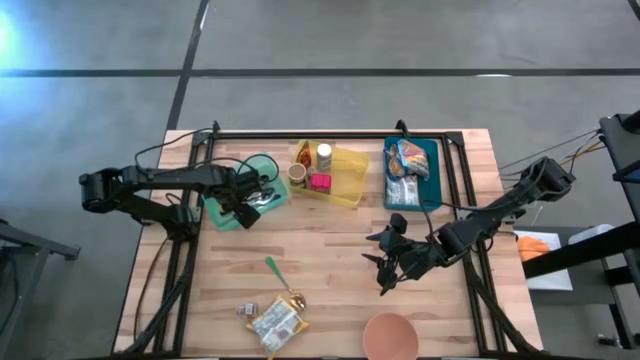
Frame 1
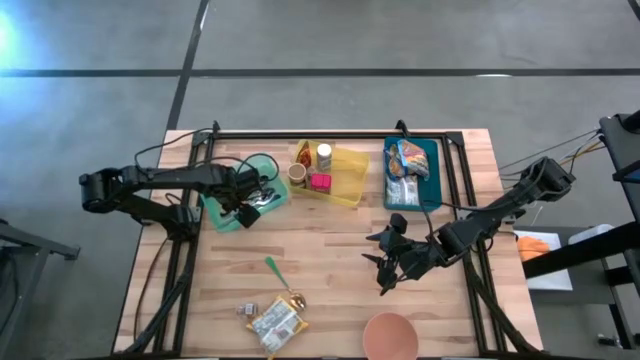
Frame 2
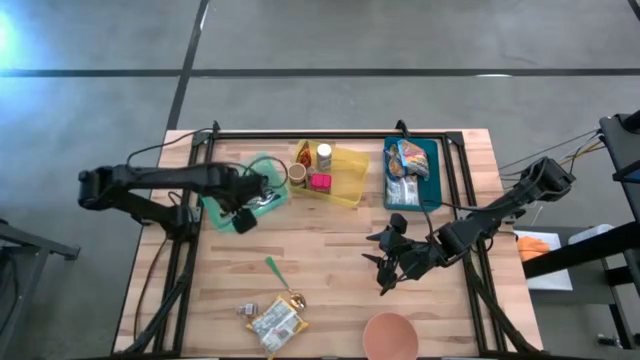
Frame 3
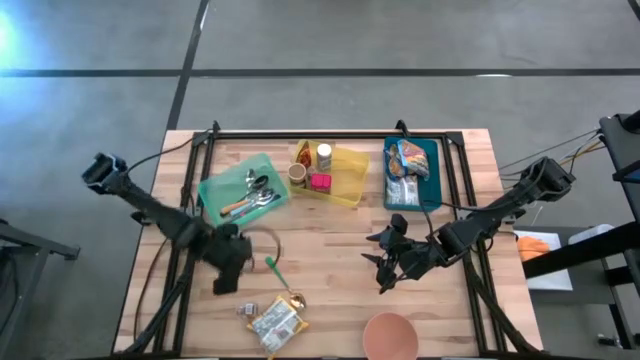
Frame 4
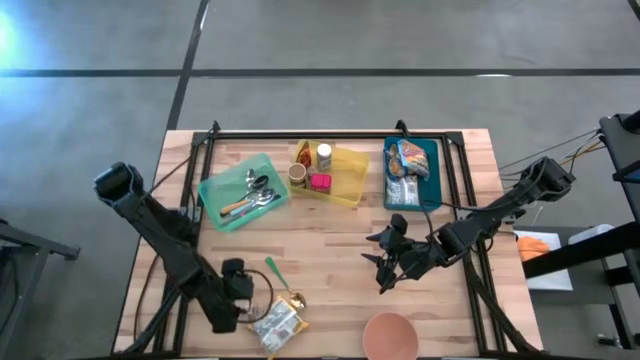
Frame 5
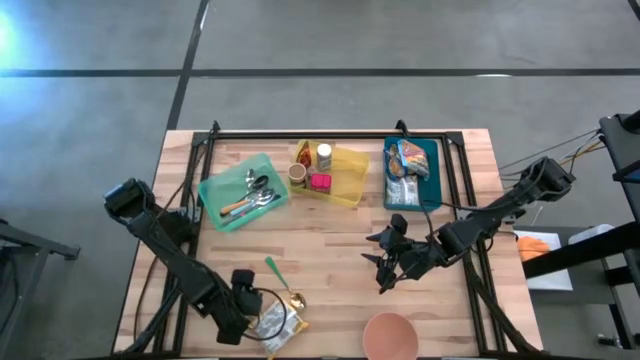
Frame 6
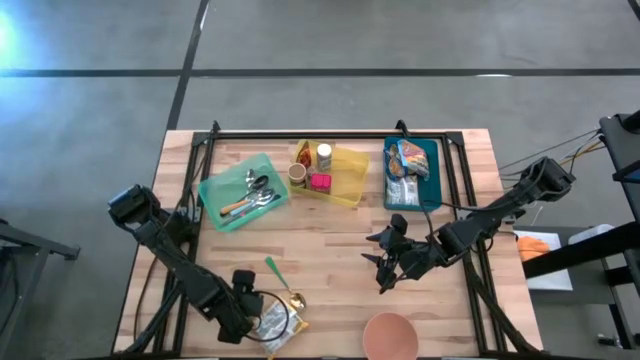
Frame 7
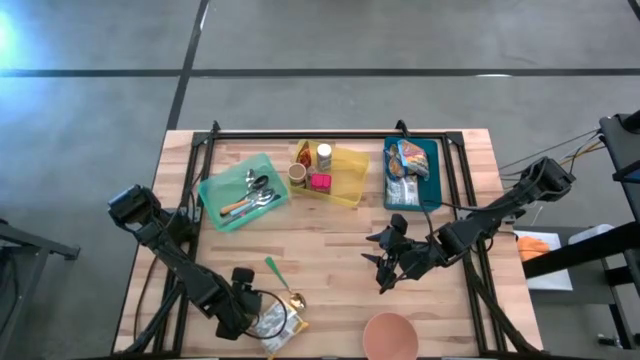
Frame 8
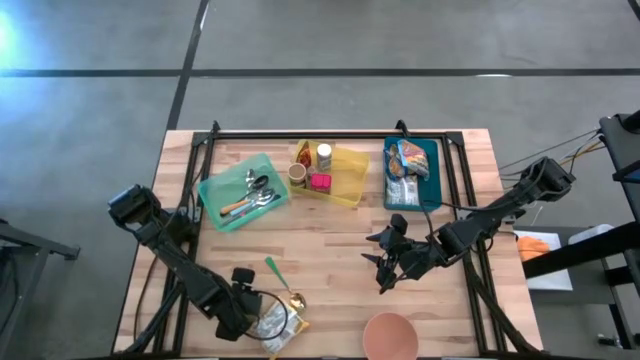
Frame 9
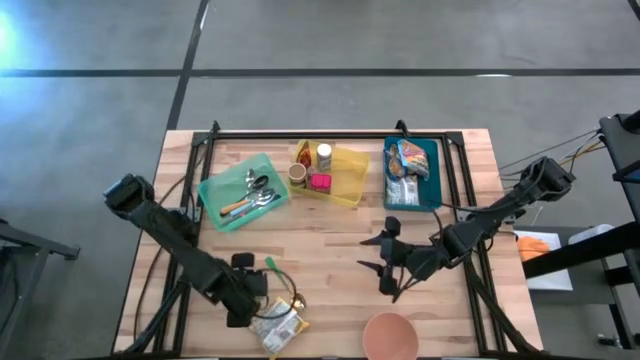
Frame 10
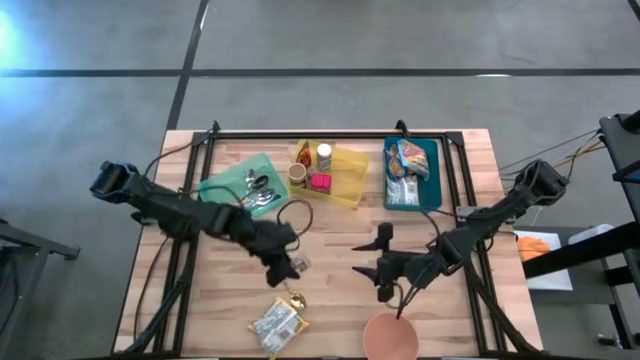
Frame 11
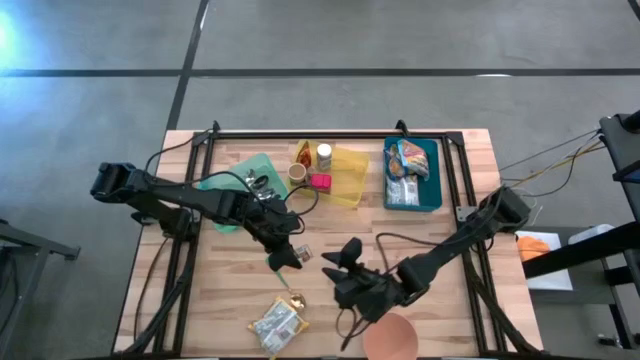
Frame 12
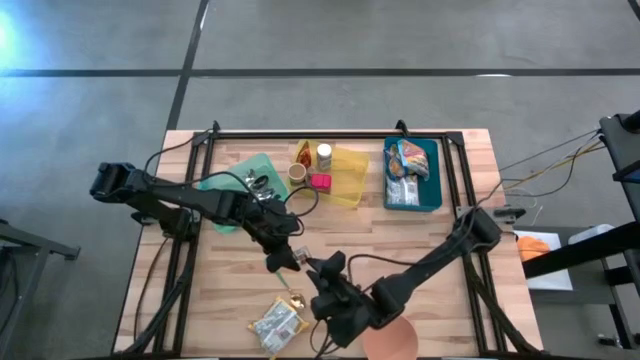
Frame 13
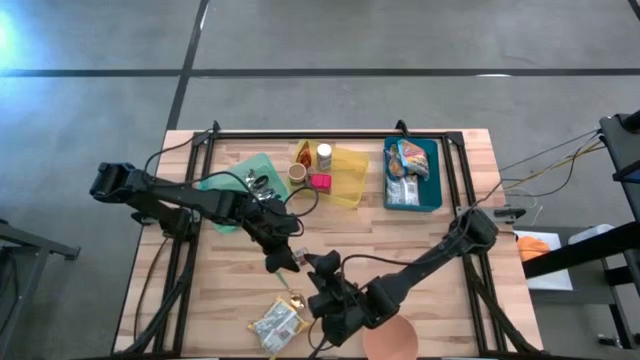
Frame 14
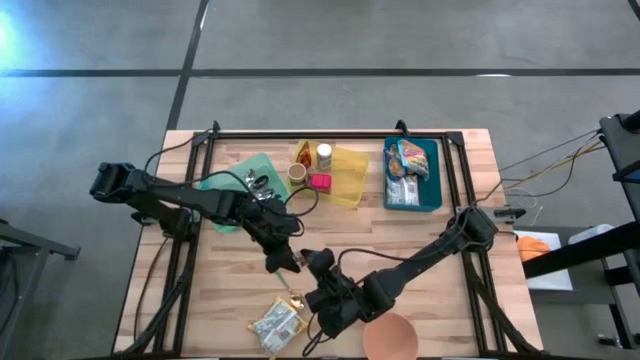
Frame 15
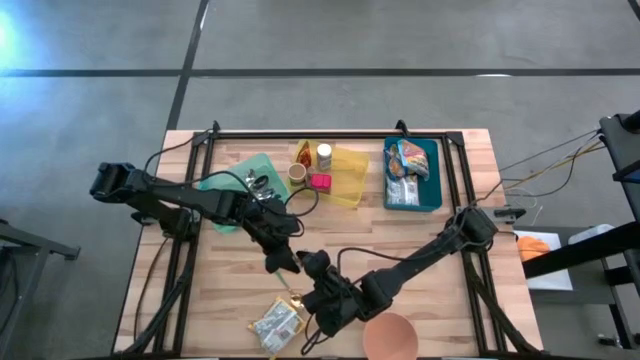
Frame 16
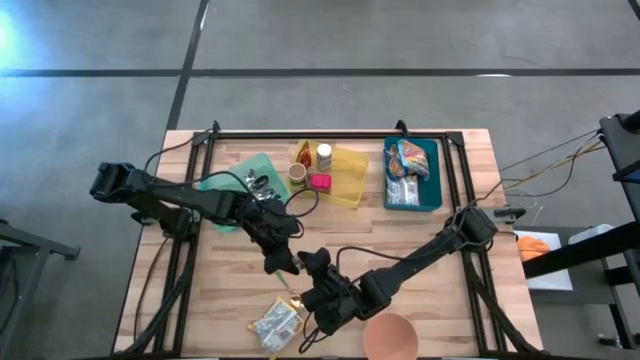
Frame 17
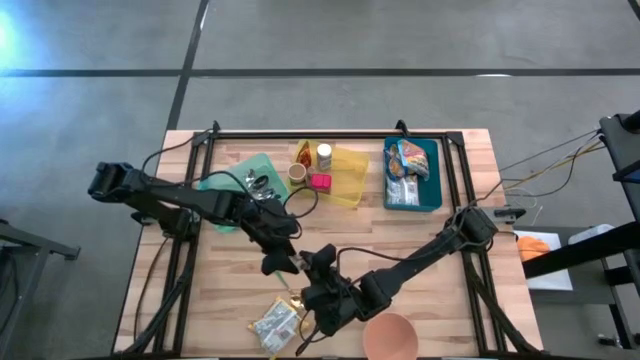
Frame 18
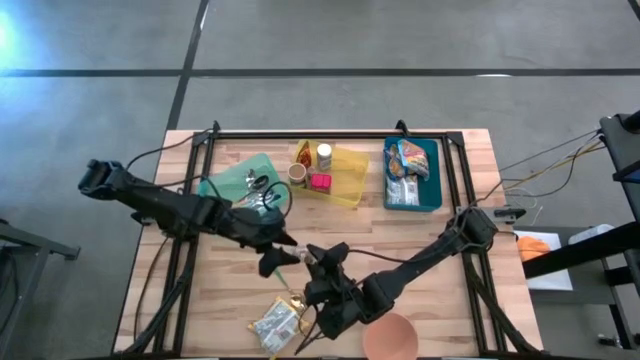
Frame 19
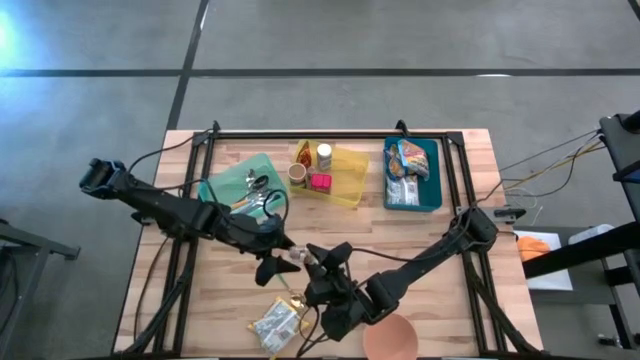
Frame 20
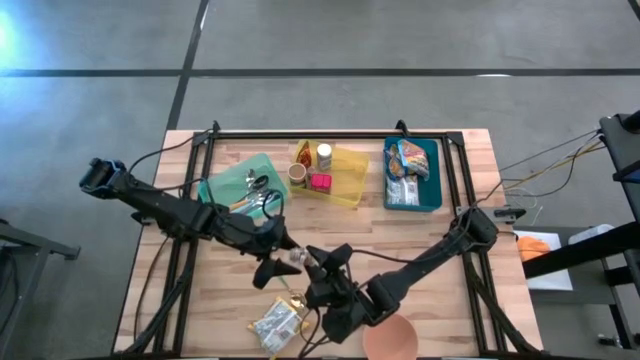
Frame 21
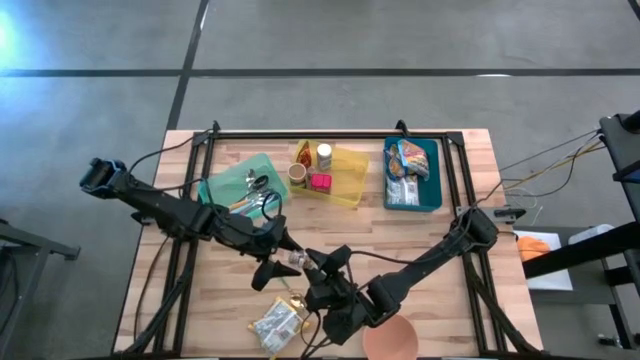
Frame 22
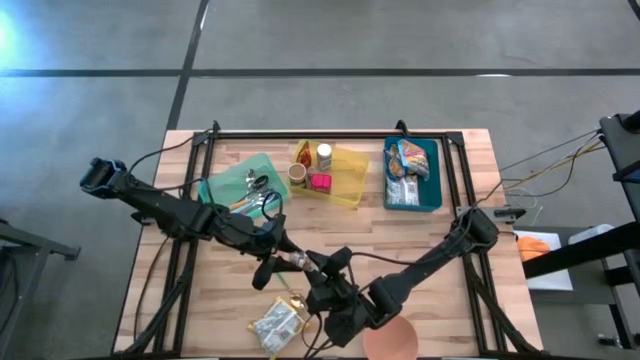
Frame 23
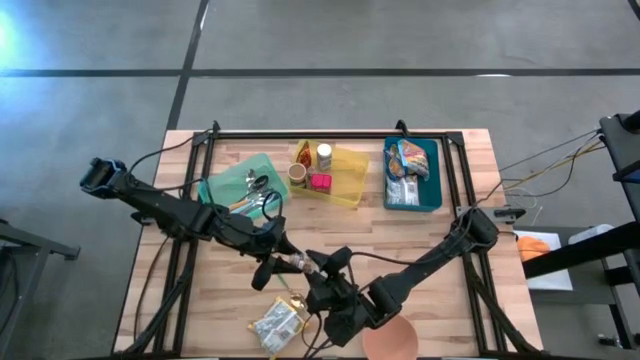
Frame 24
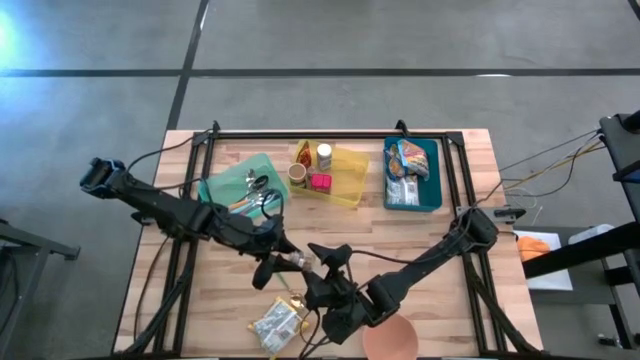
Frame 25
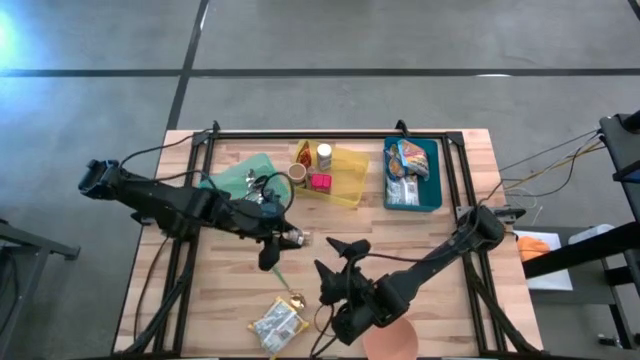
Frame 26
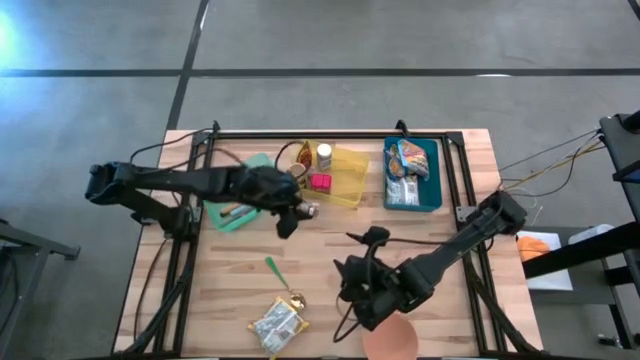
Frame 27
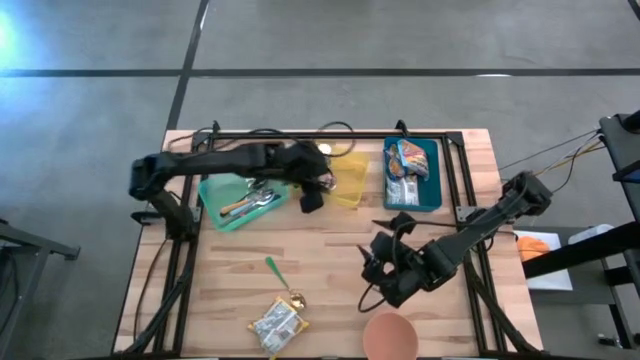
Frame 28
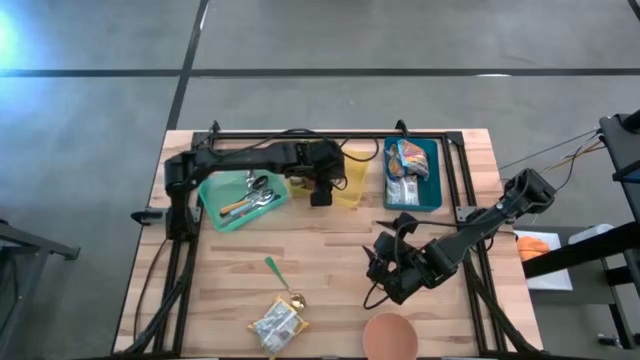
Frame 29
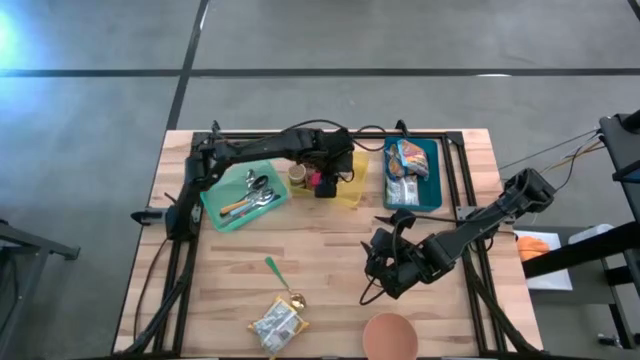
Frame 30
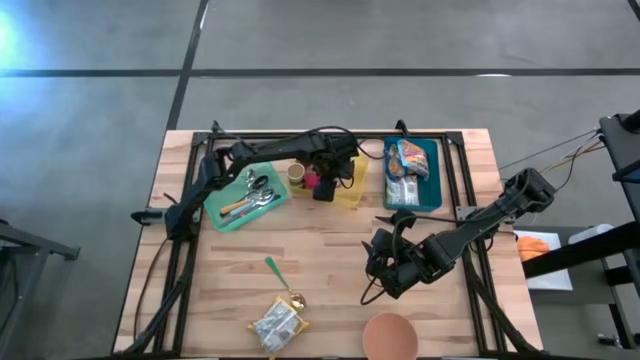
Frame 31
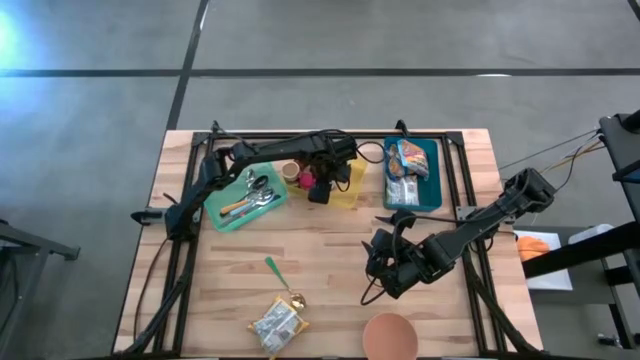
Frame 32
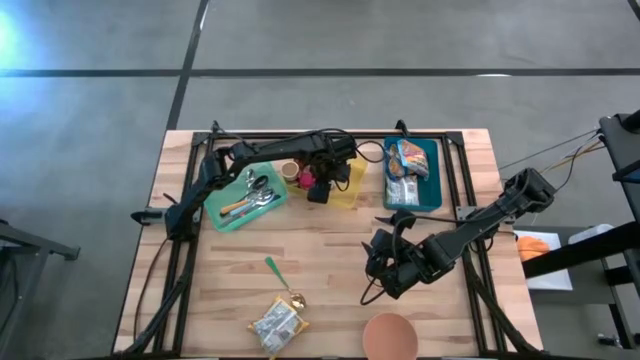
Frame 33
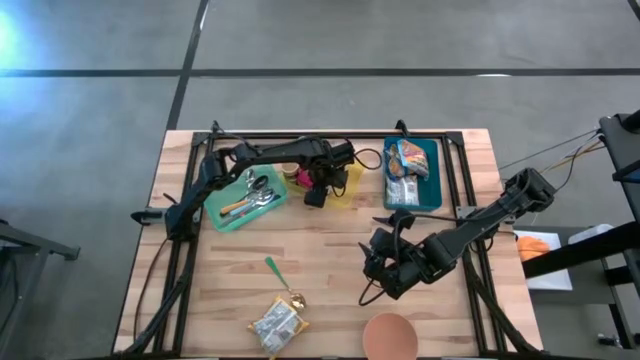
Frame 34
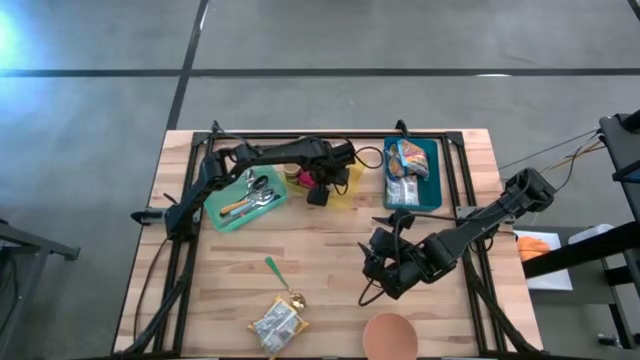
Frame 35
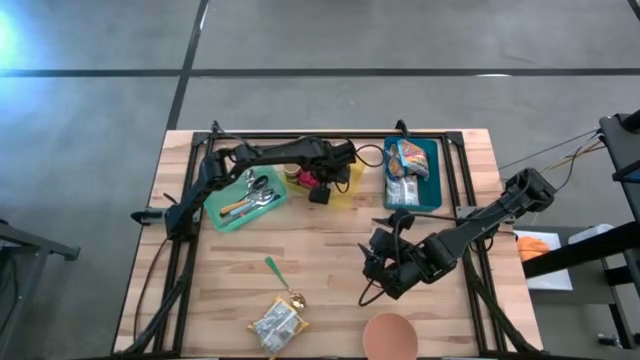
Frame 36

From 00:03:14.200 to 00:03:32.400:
Put the brown seasoning bottle into the yellow bin
